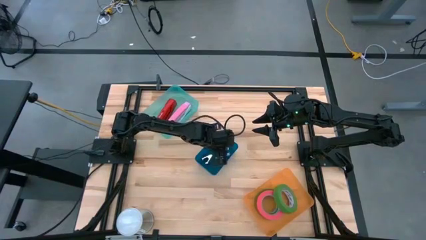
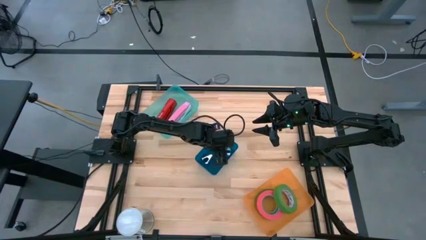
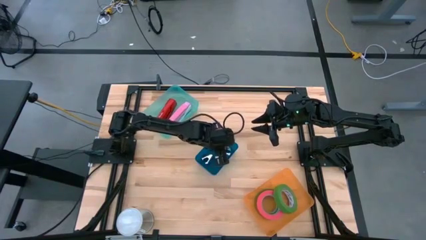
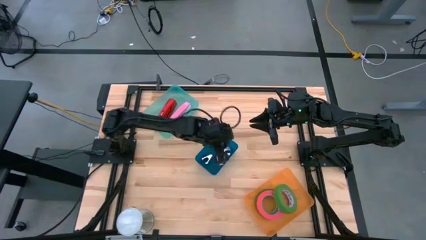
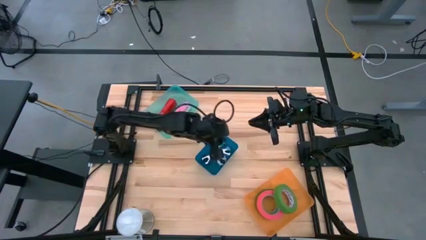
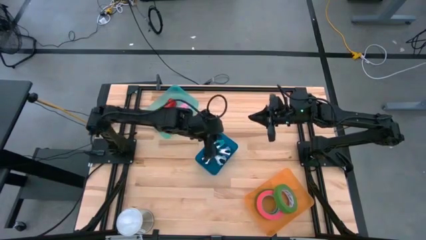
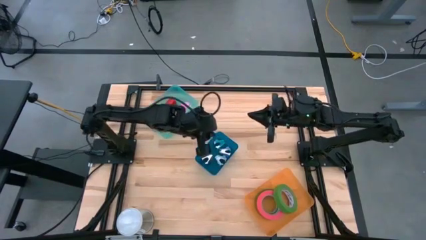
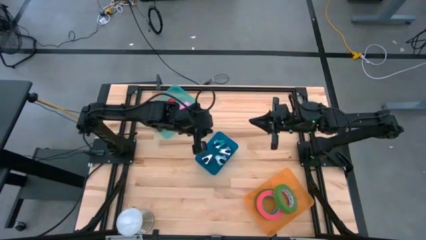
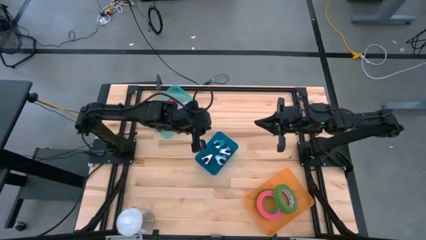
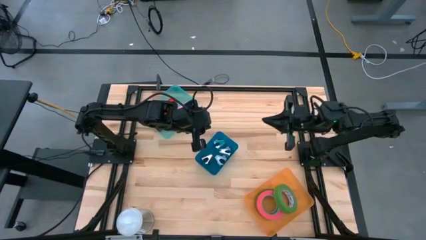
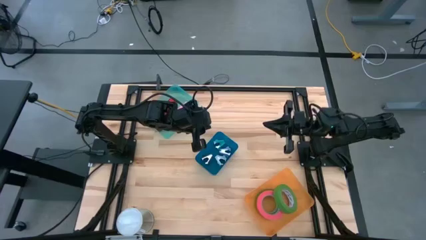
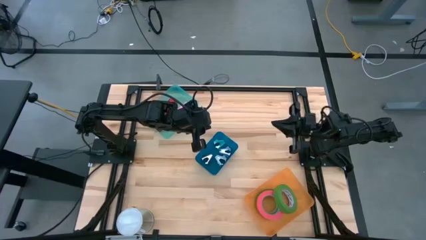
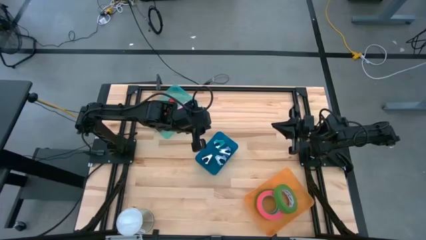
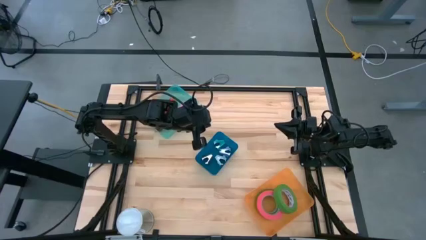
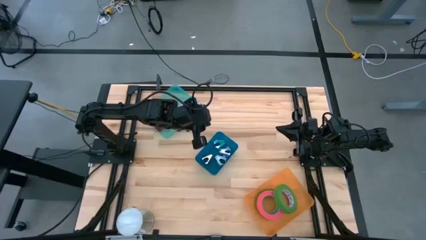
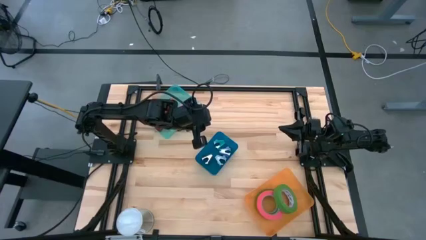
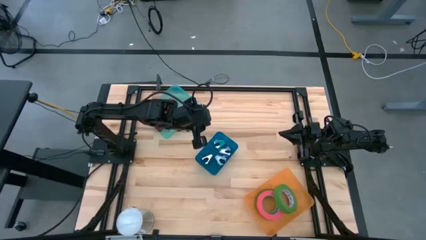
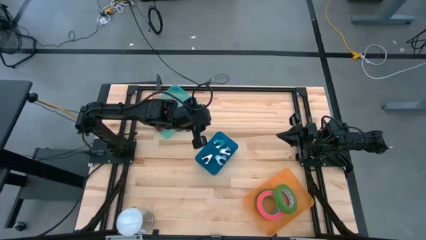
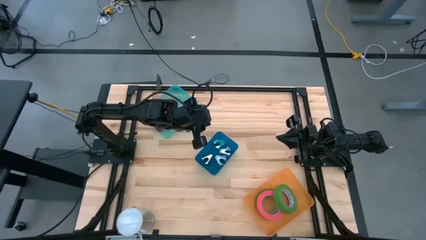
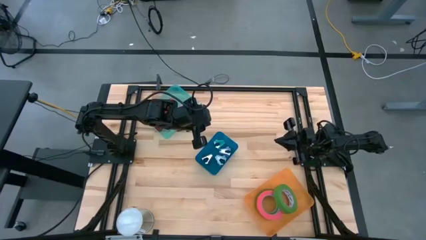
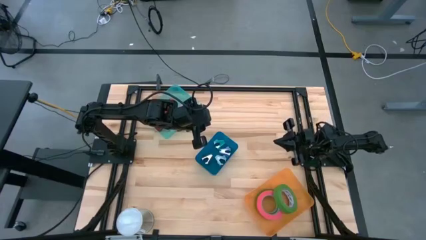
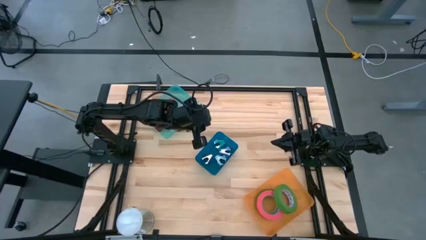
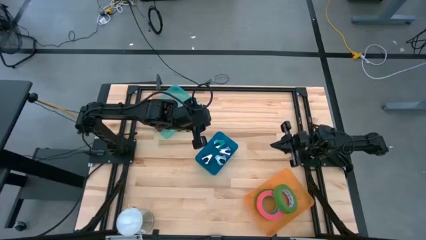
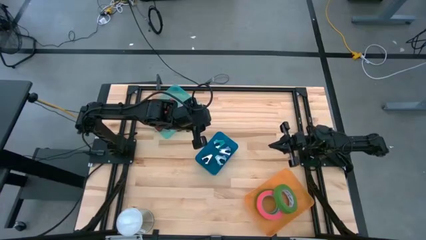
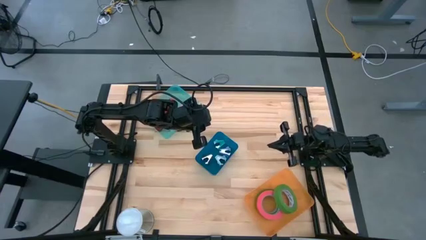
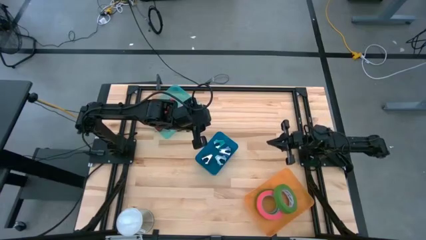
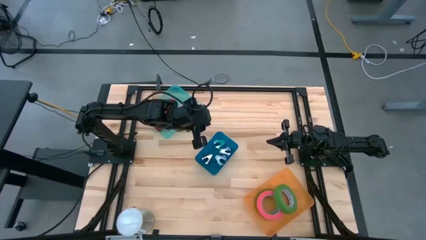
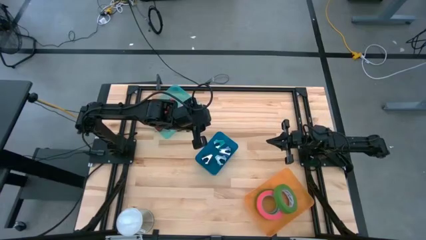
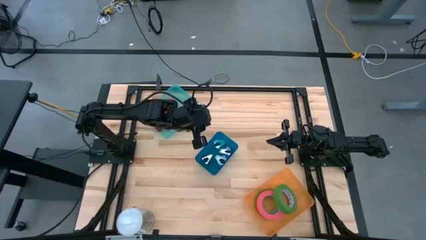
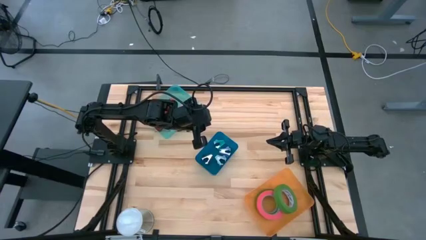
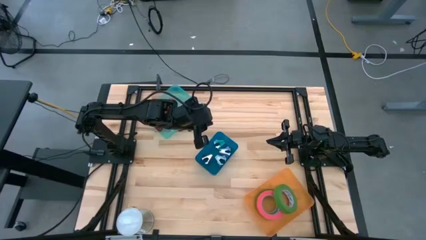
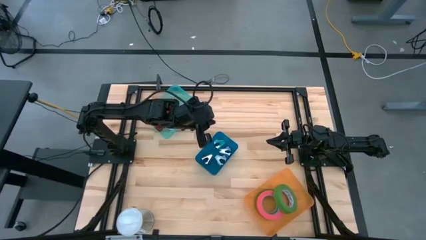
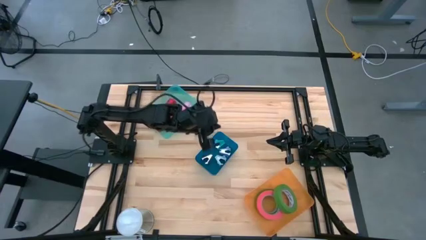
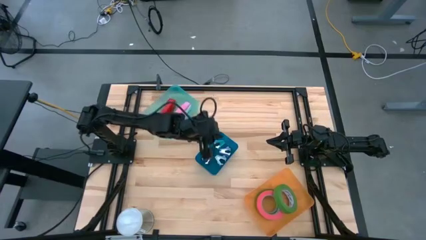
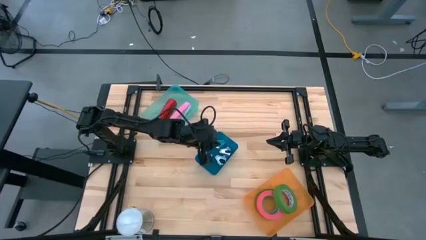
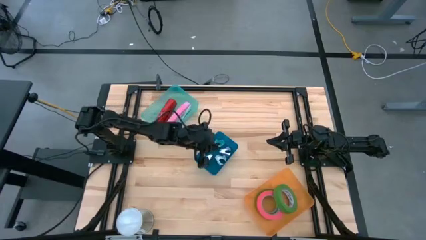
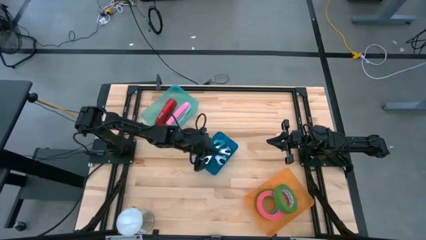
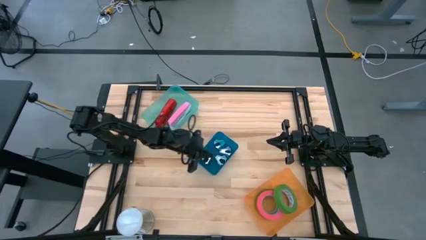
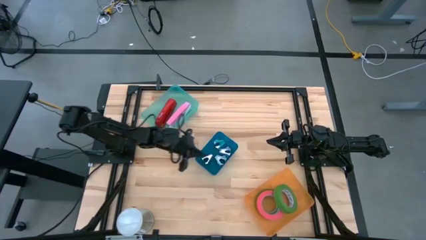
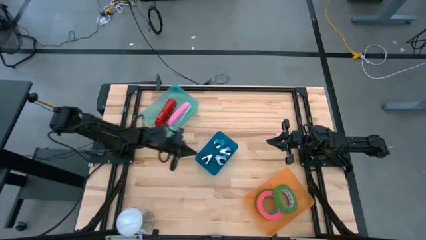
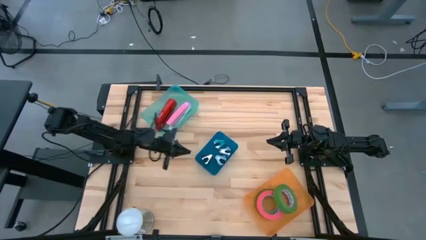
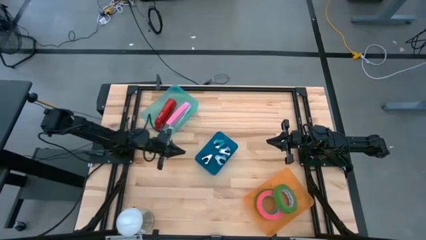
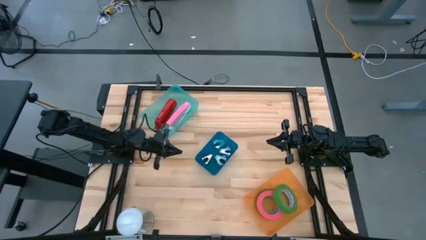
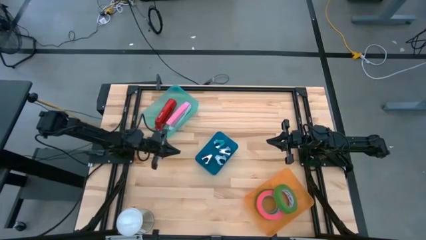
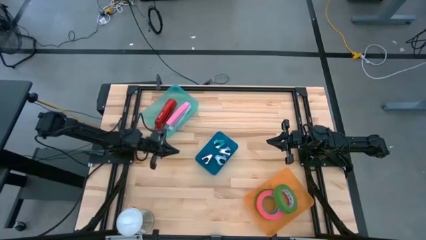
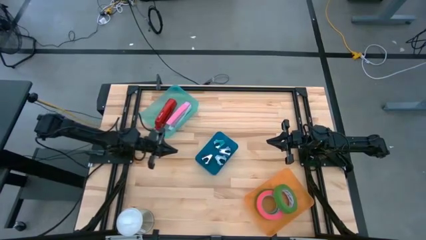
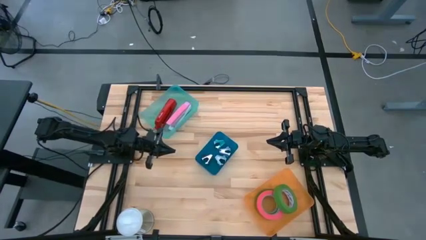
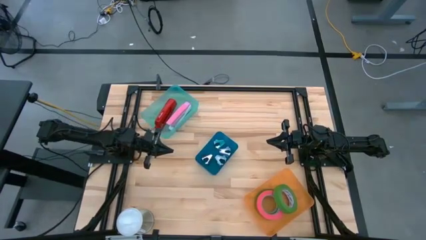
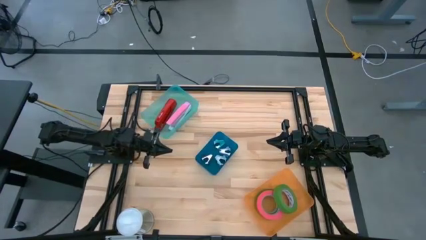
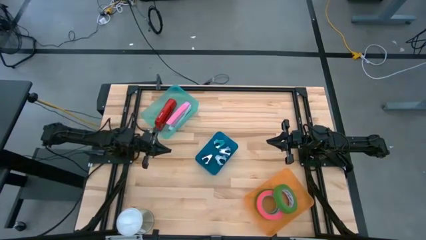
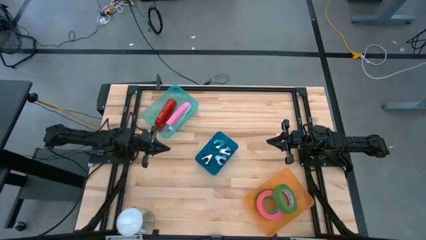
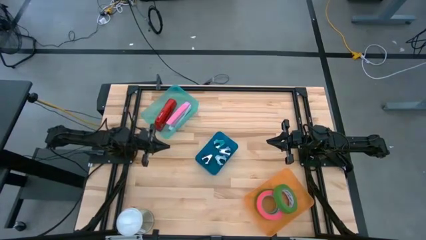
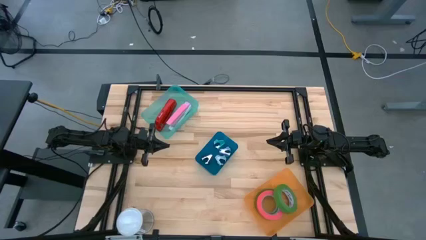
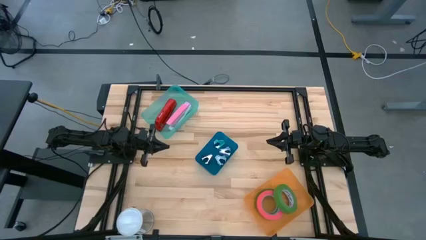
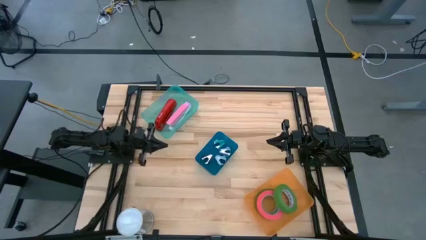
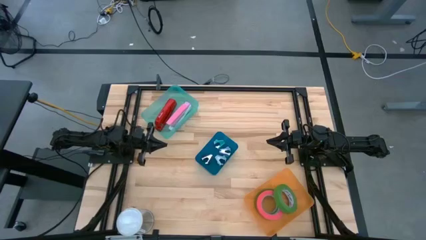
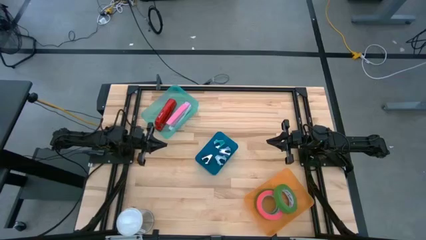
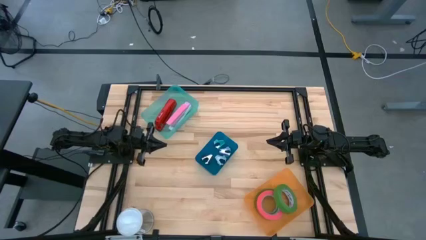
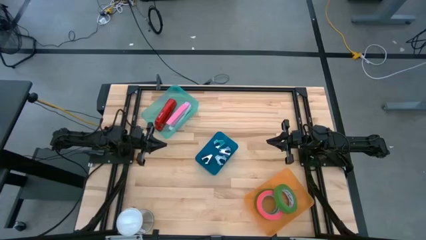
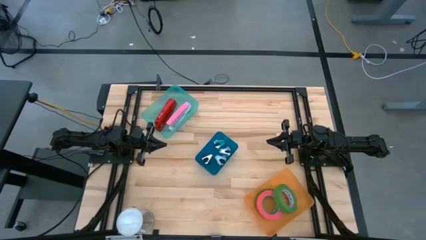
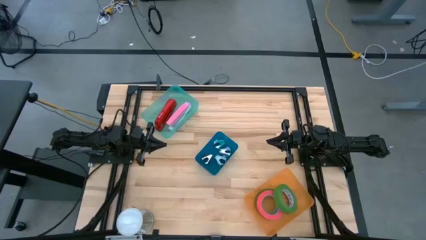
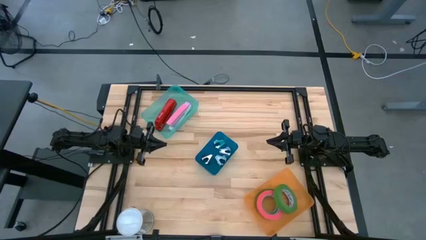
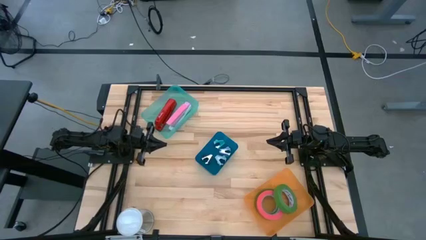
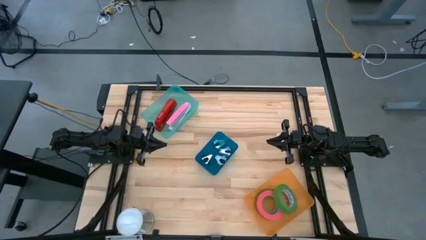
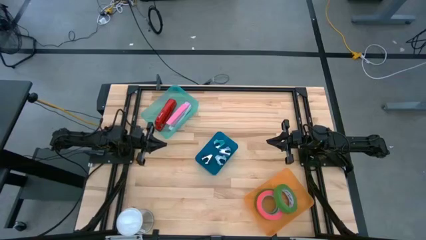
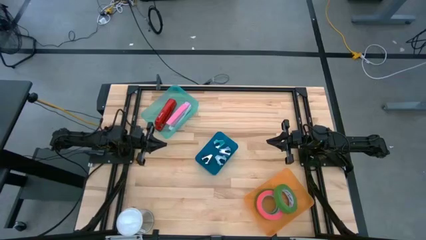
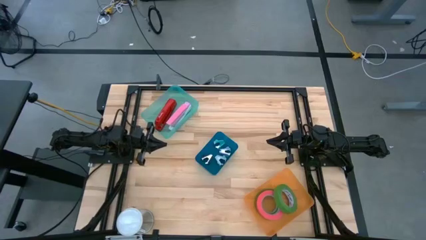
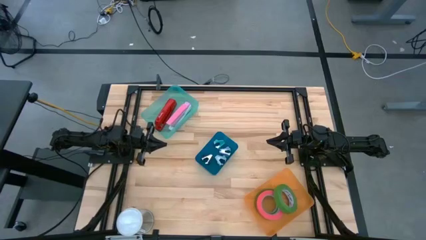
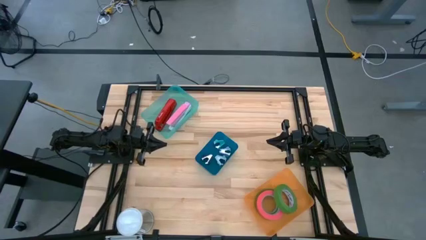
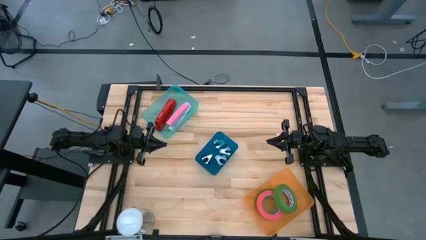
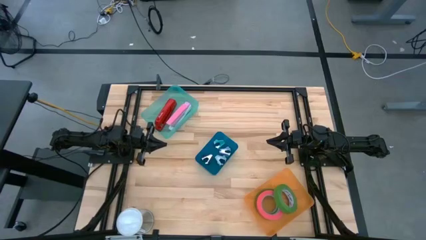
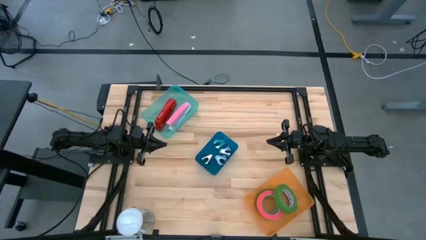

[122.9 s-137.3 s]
Task: Pick and place Stapler, Stapler remover, tape
Return to Home Position
